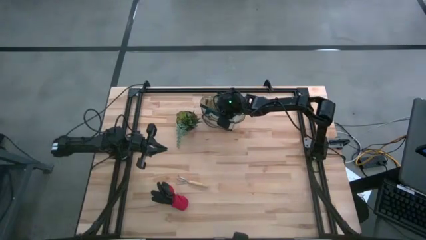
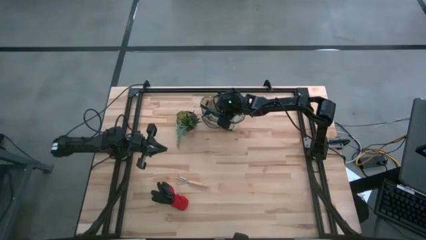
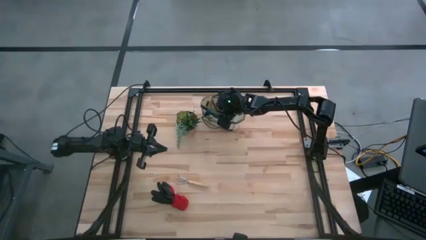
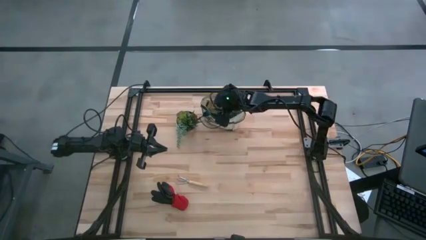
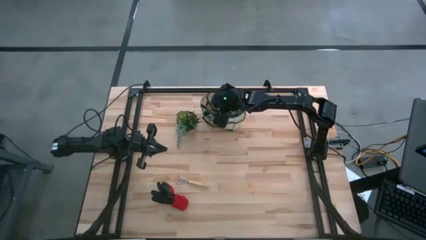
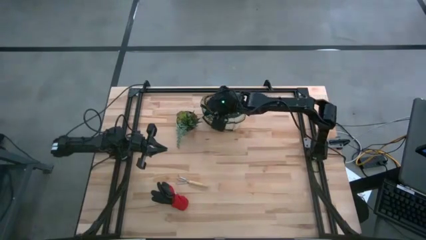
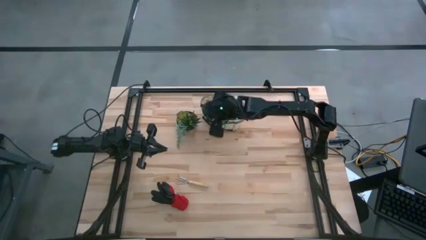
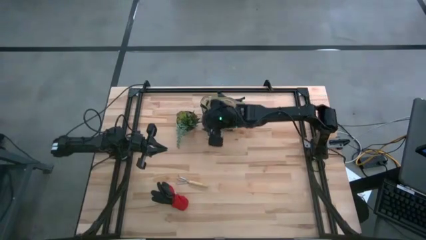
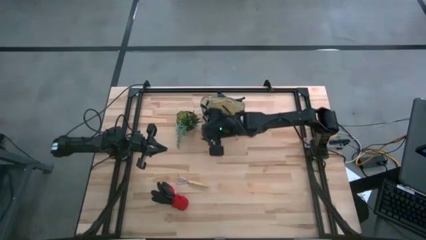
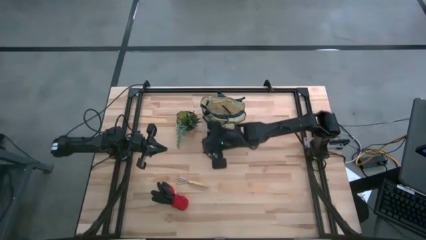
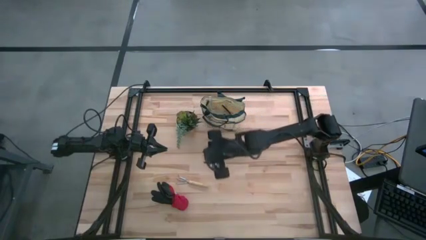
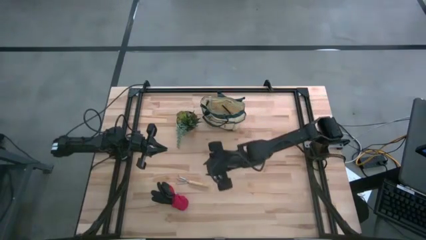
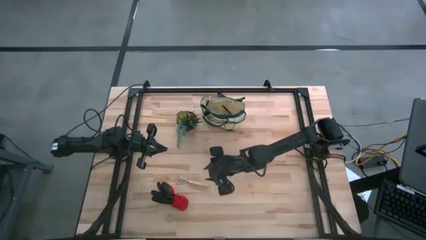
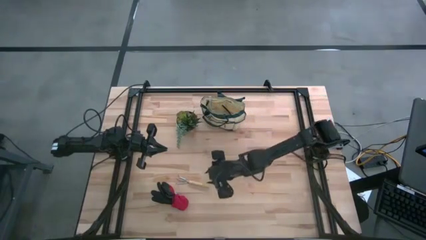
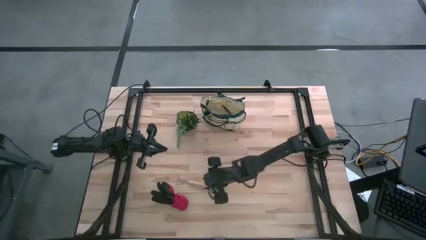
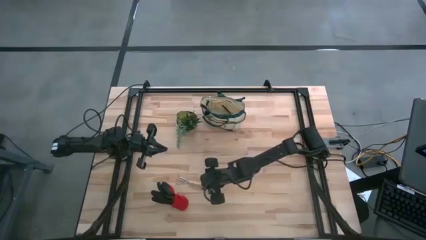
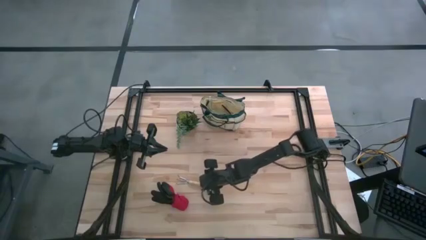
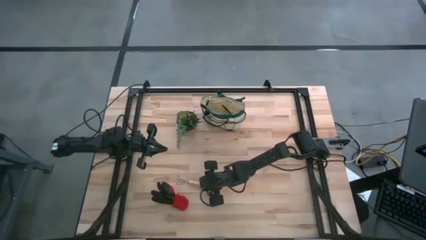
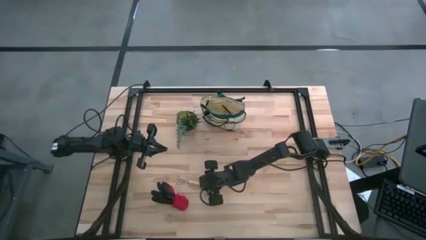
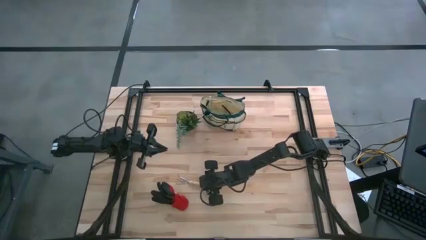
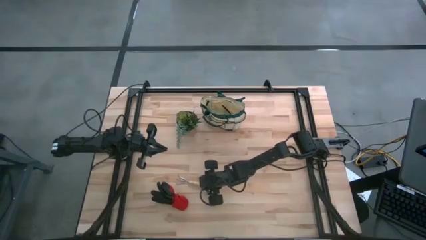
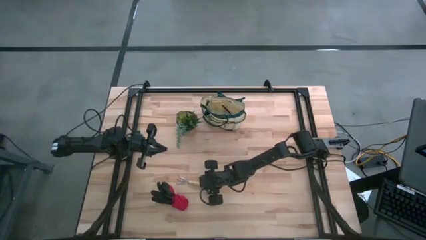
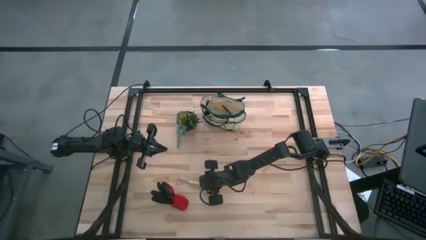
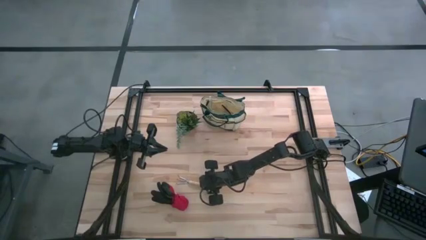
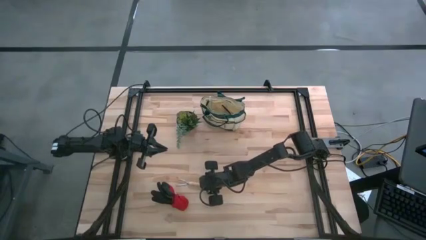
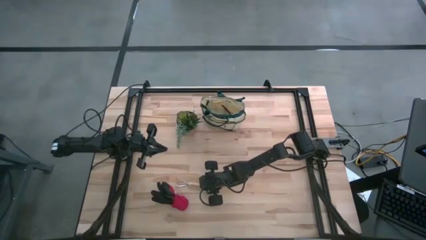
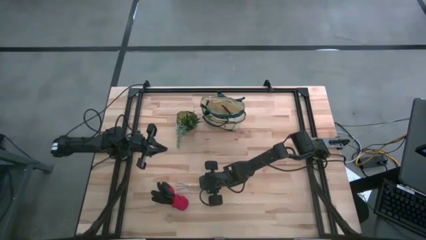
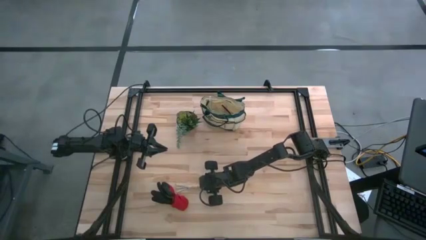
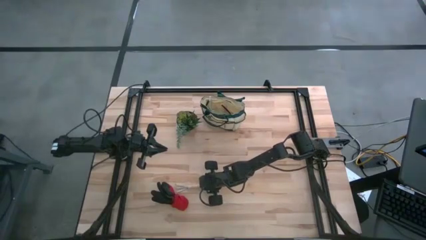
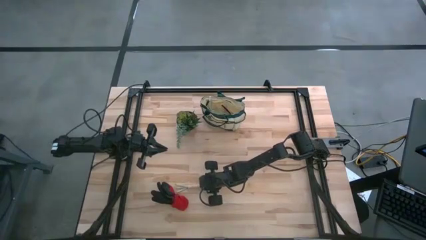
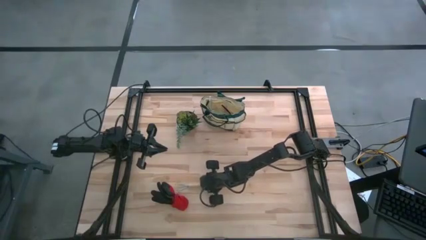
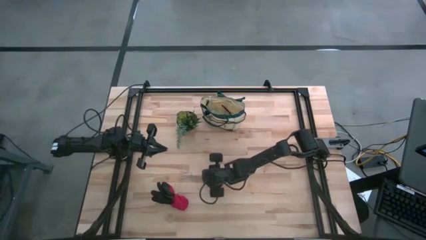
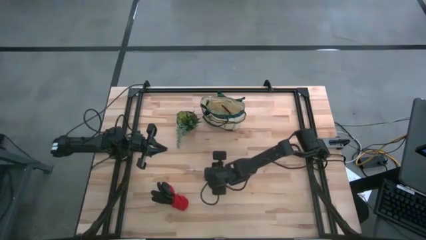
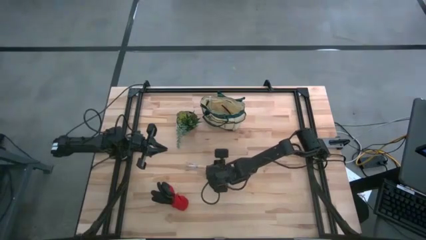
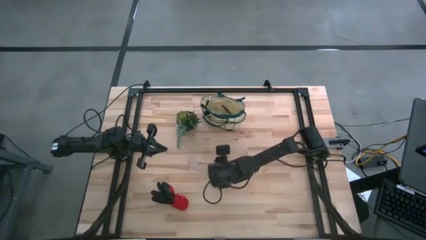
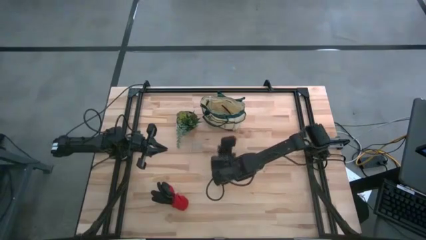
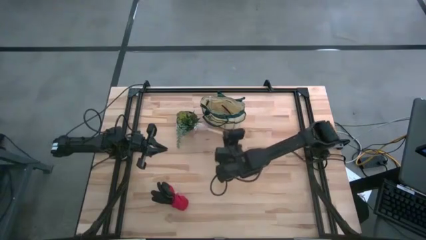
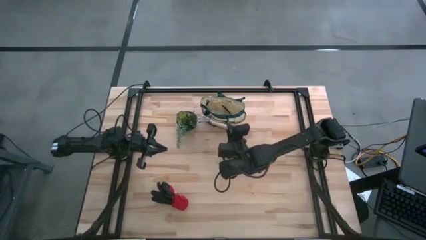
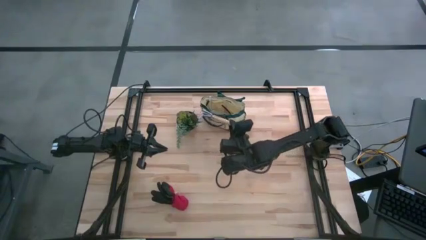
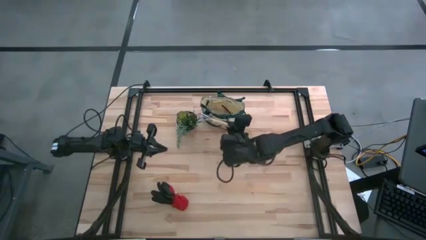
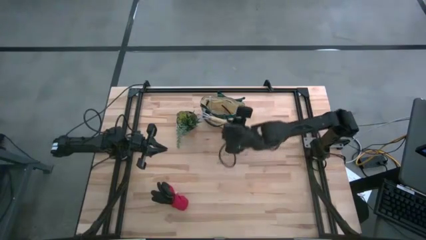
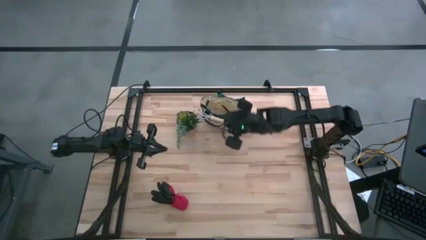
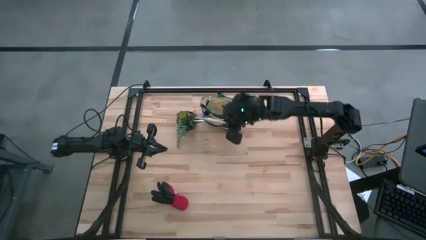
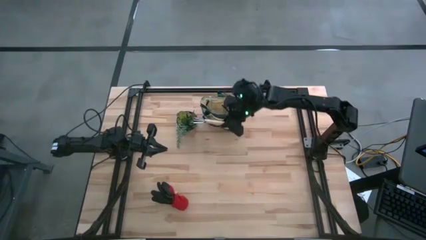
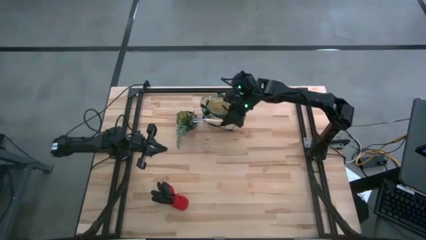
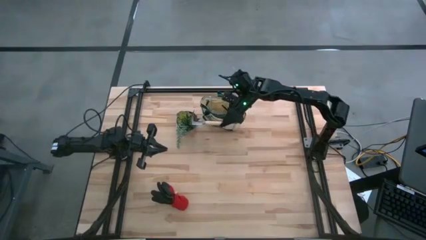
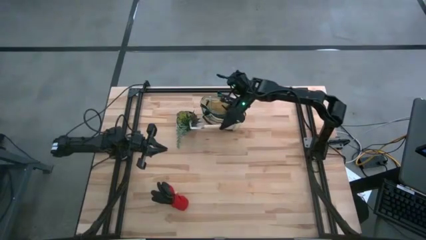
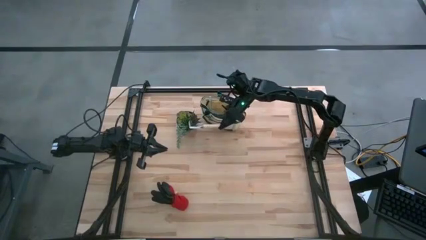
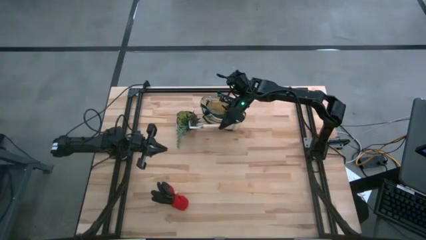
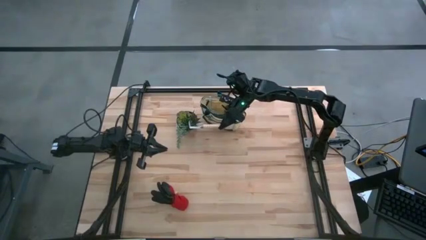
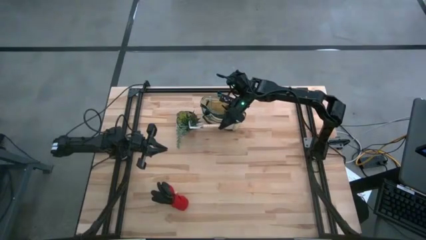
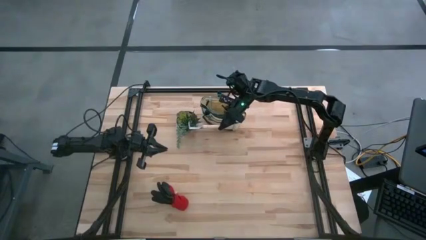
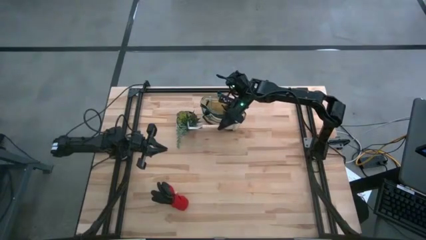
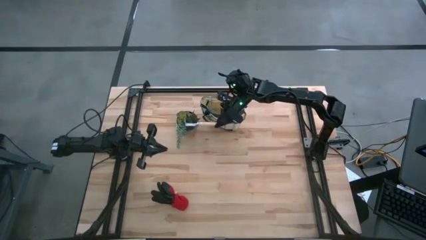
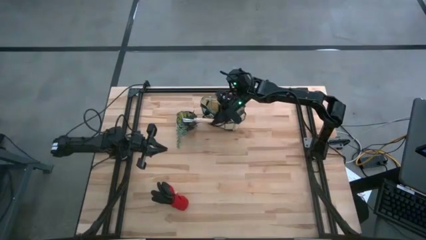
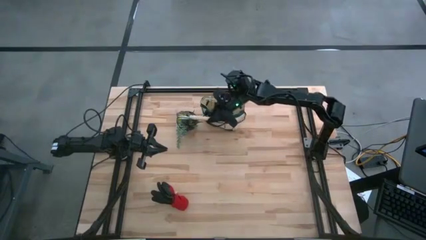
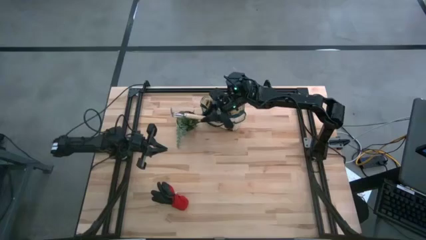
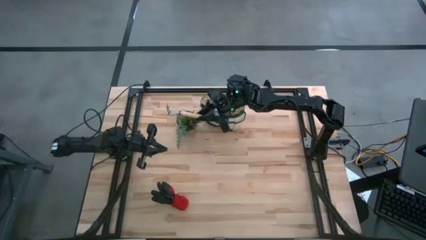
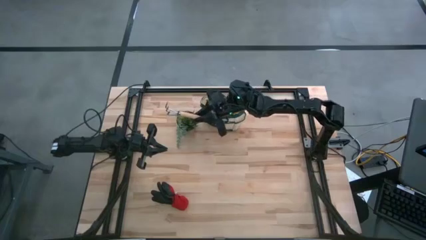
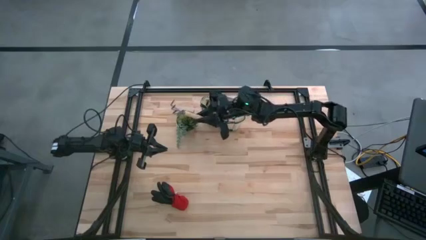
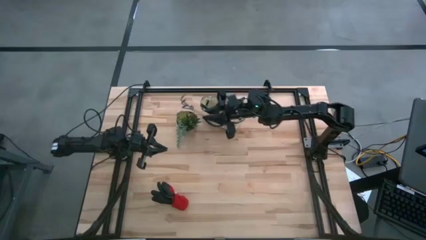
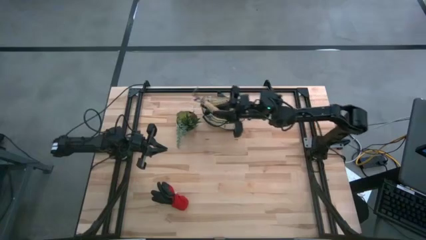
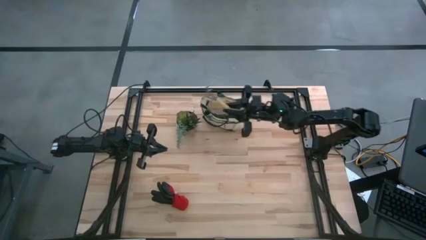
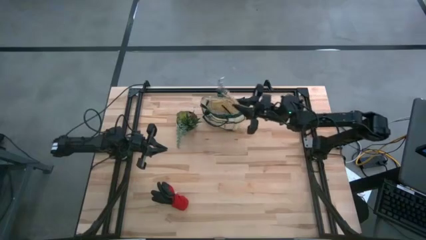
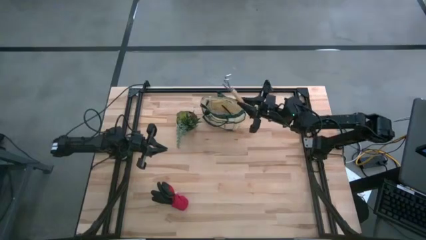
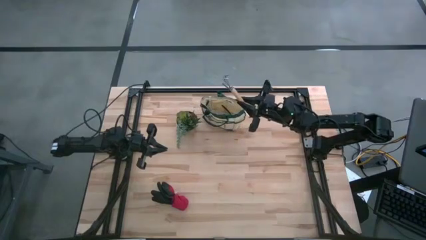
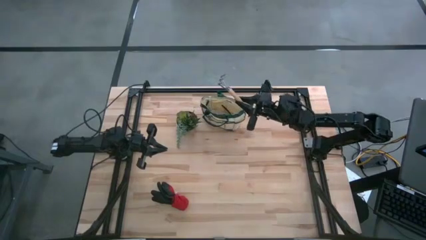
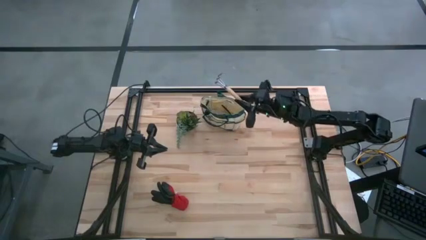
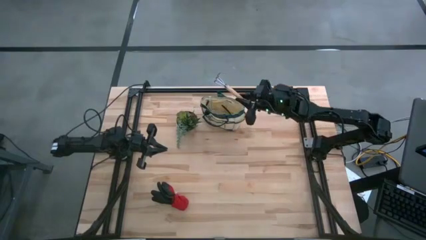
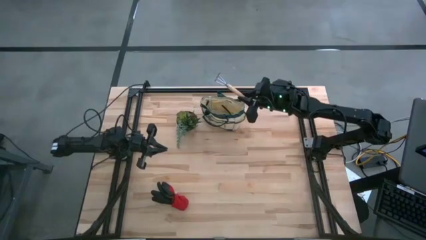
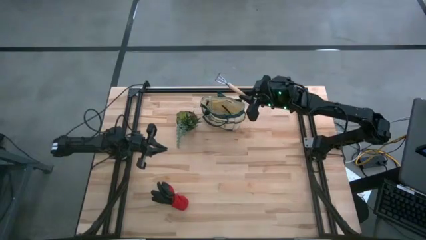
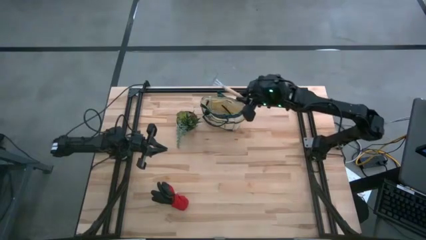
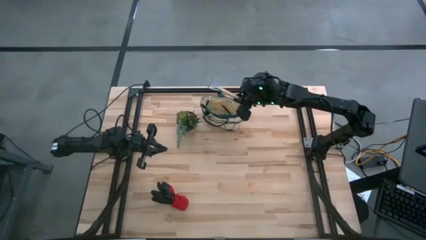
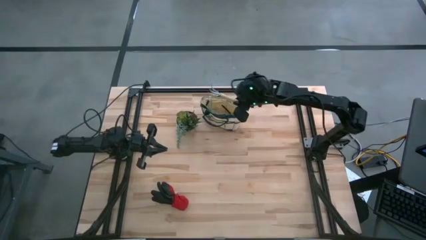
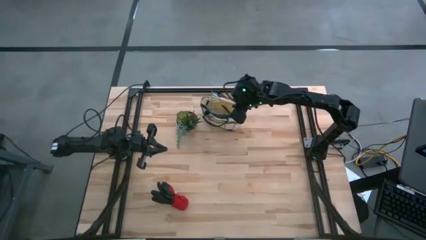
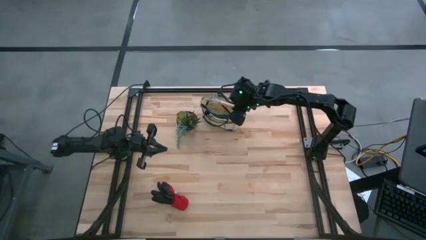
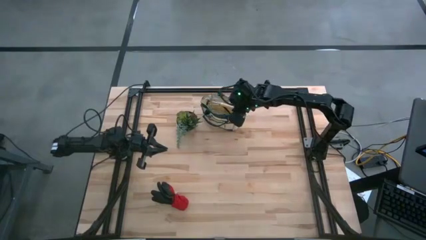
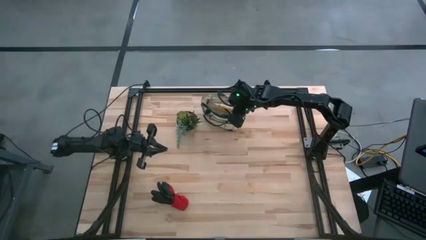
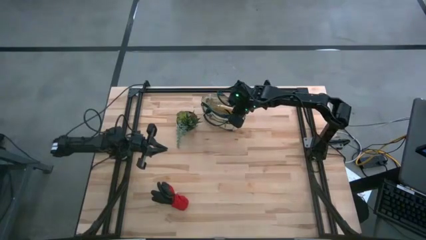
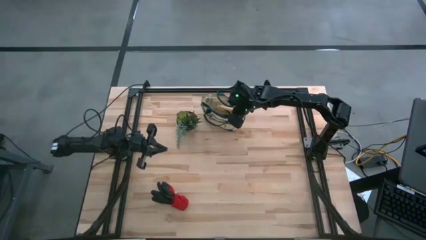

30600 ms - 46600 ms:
Task: Pick & Place Garden tools in Gardening bag
Put the brown hand rake into the gardening bag
